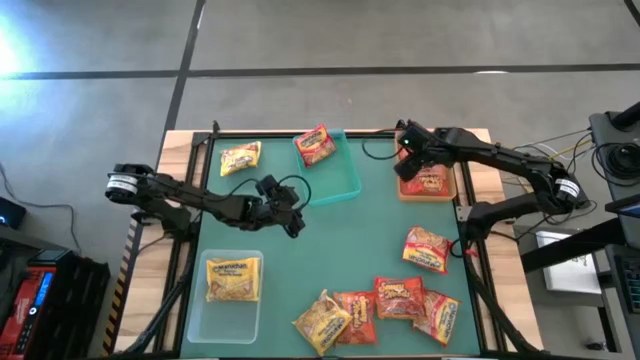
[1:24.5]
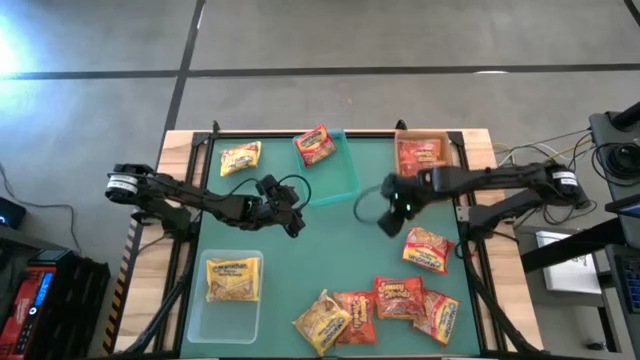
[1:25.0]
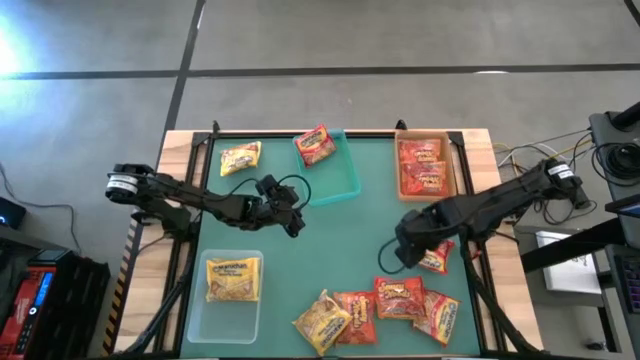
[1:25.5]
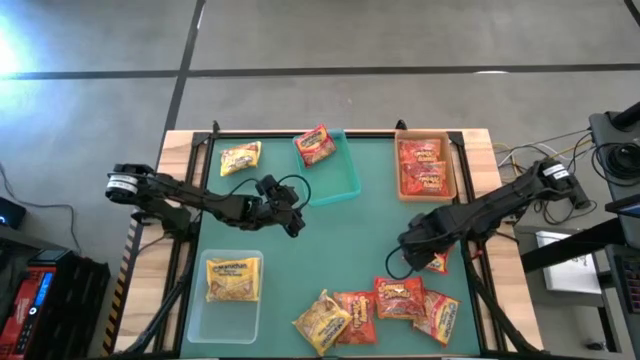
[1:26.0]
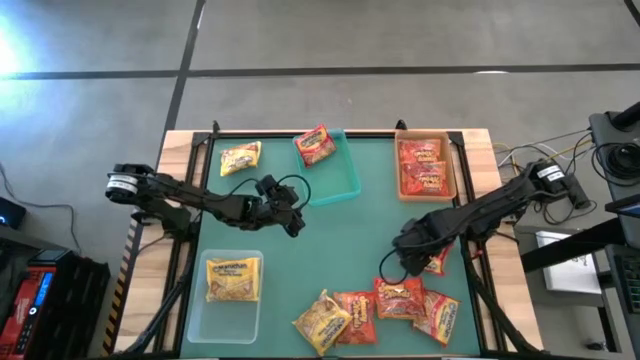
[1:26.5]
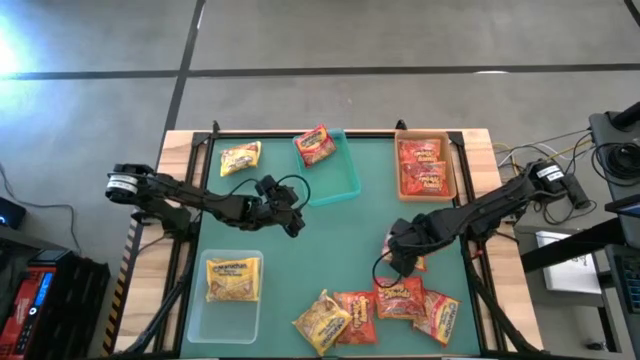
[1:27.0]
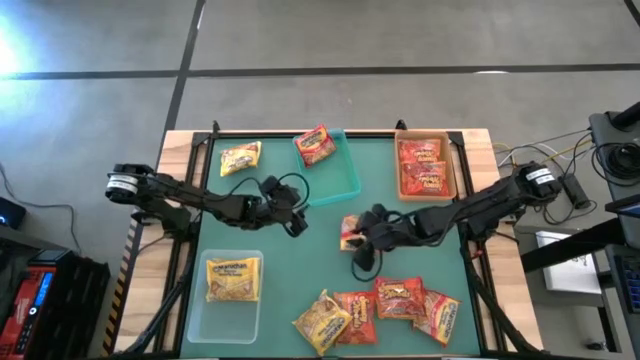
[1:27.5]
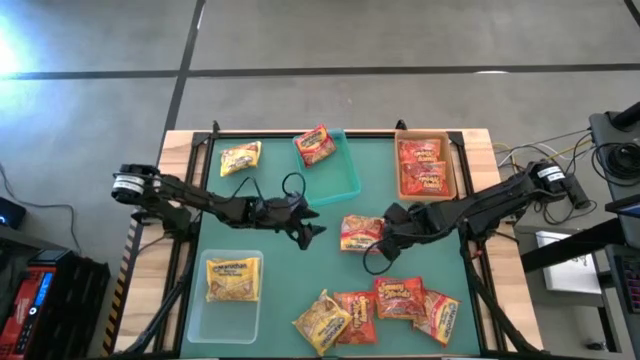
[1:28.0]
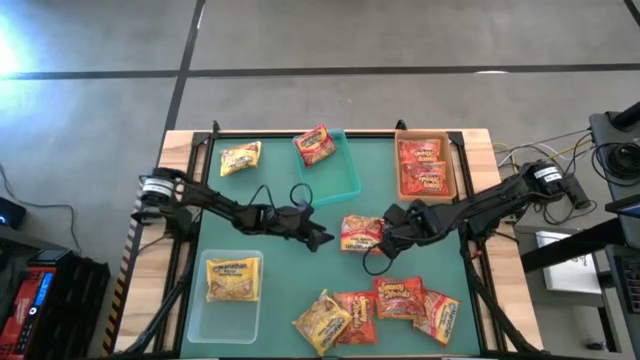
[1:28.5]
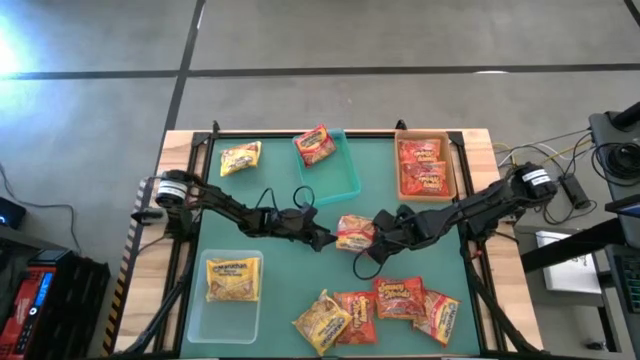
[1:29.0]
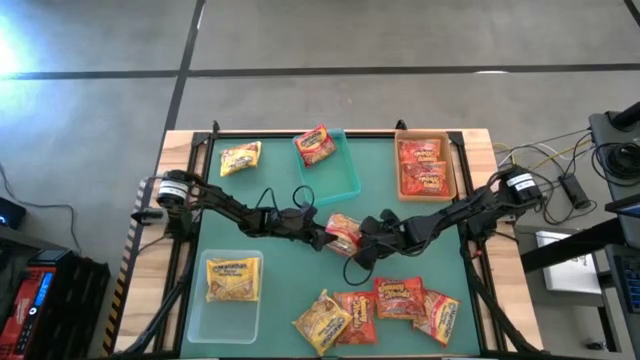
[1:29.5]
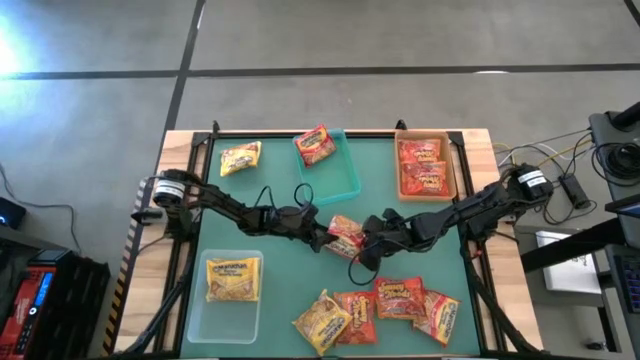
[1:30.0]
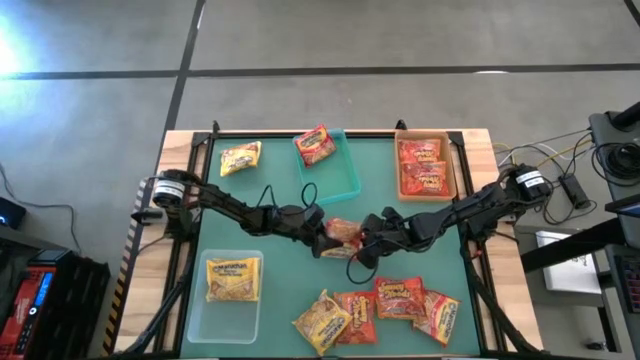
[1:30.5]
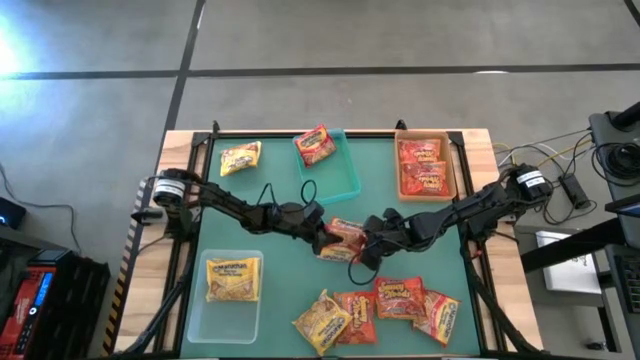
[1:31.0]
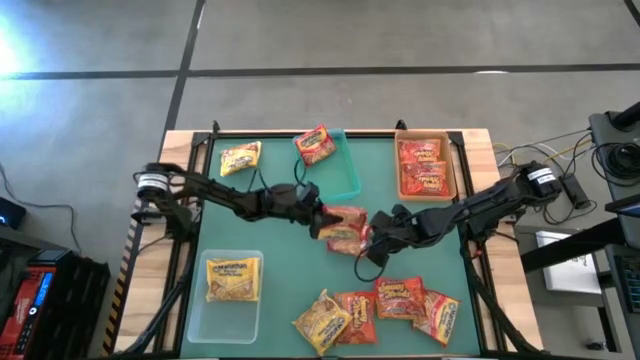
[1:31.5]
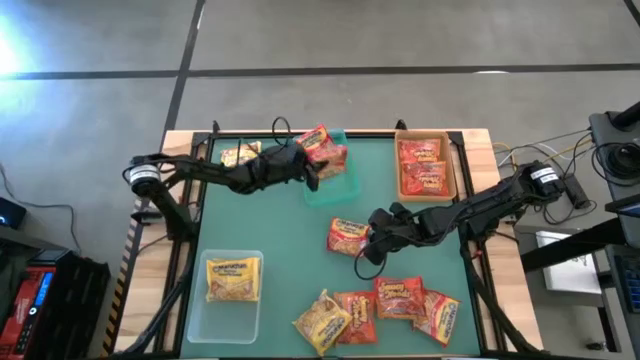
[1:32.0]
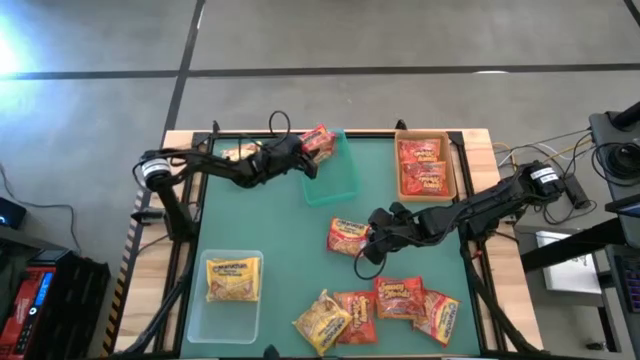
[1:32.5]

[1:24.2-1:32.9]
Task: Sort Maruchan noodles
Put the middle right red noodle pack into the green bin

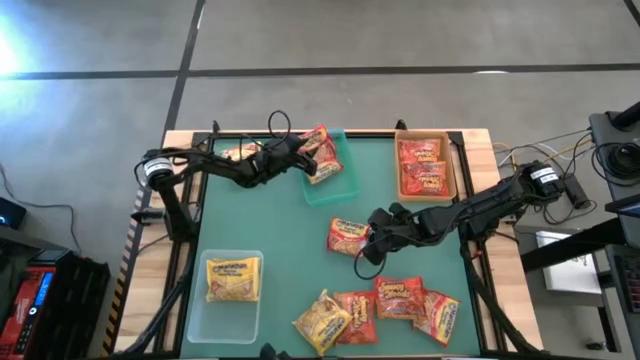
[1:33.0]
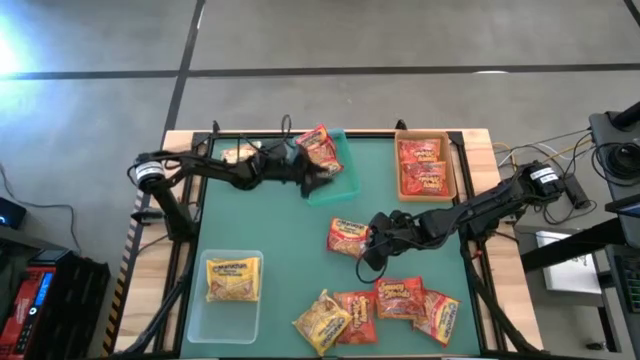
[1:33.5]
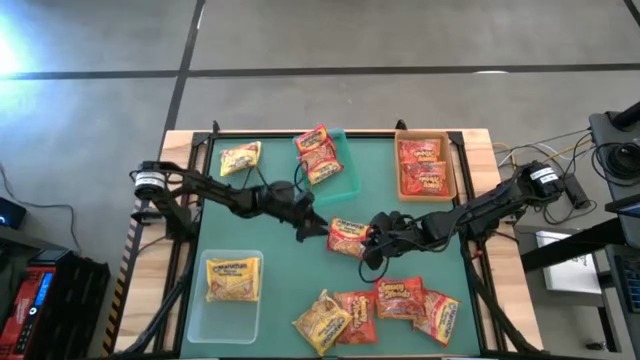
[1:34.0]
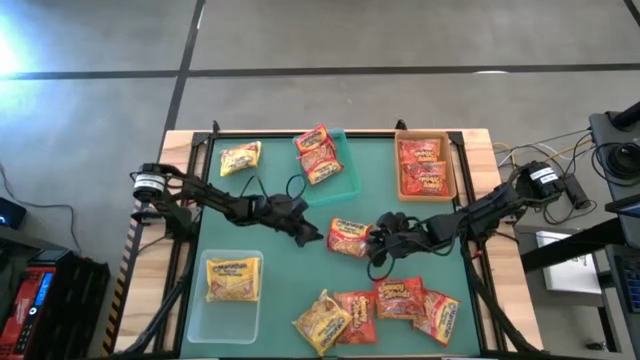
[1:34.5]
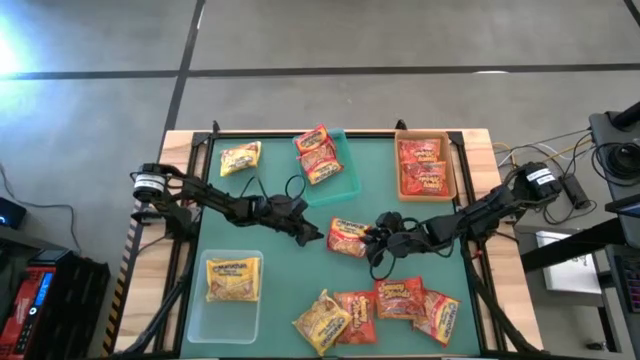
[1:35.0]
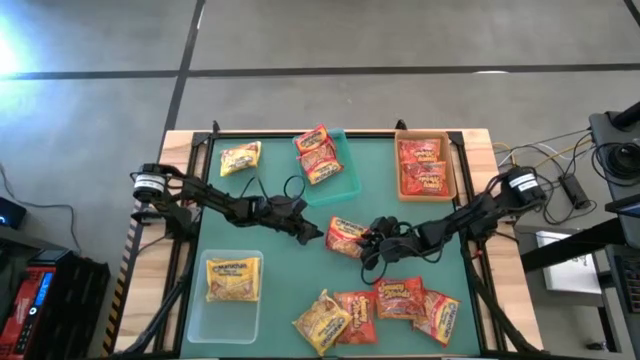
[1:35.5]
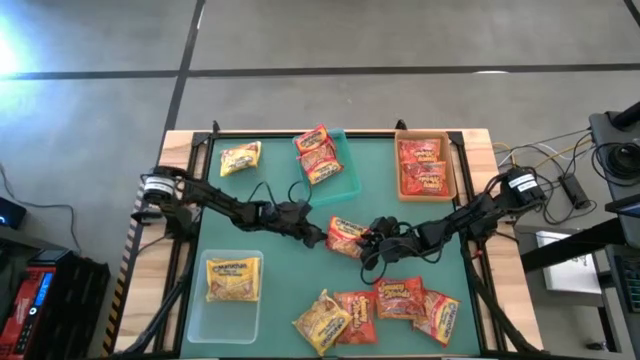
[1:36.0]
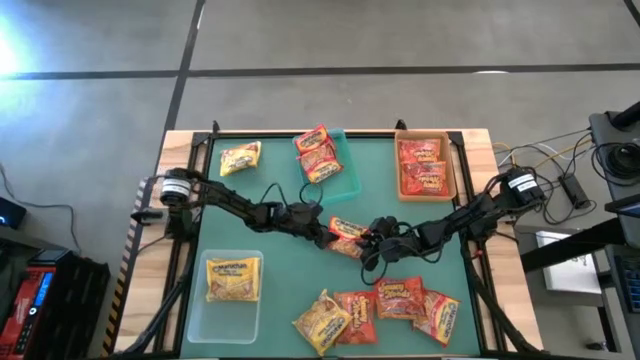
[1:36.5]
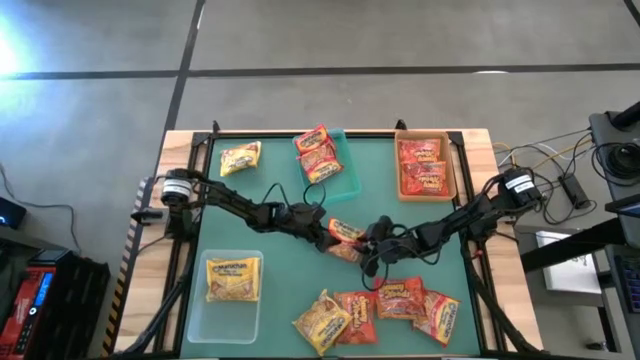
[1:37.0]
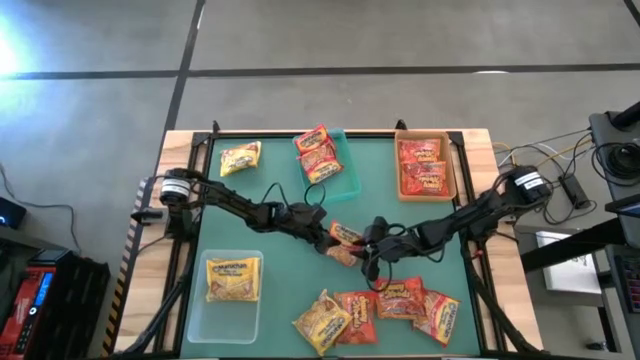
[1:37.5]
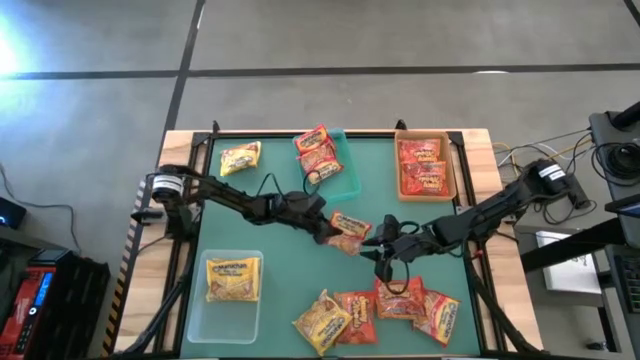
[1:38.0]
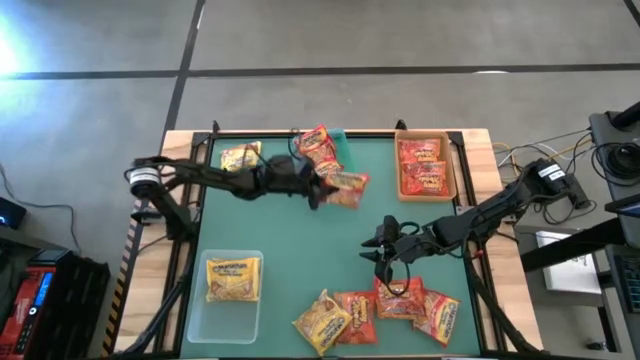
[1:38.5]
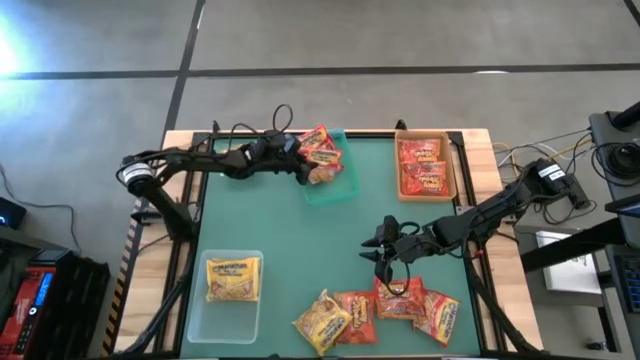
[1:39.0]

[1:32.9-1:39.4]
Put the top red noodle pack into the green bin

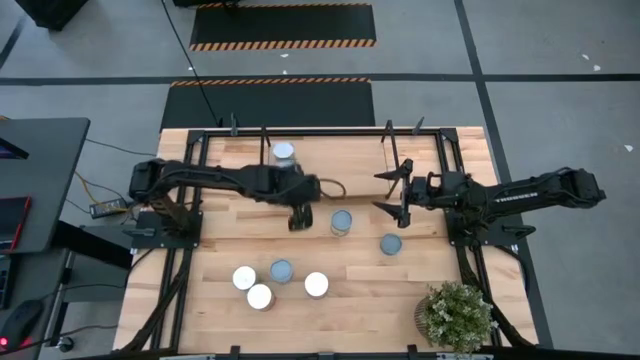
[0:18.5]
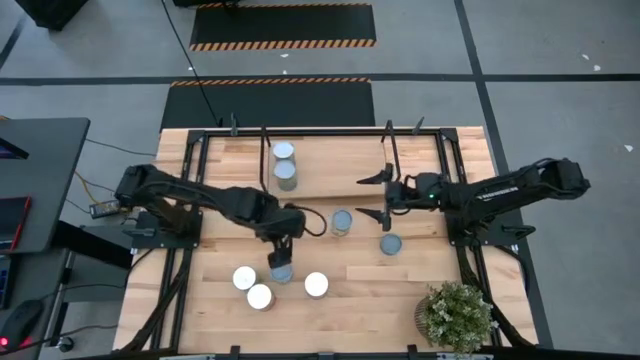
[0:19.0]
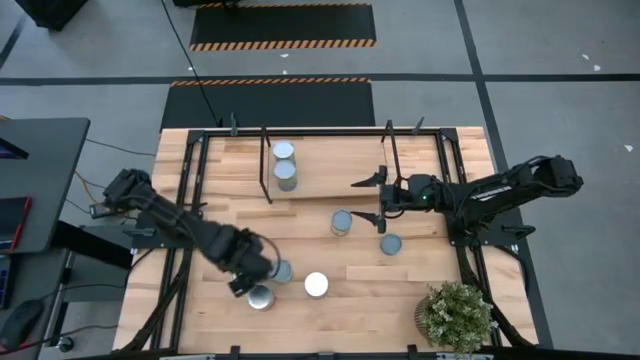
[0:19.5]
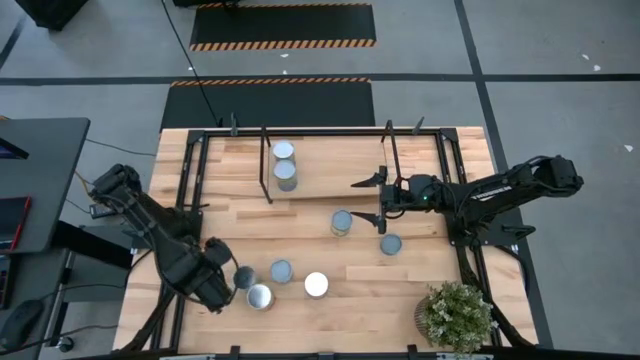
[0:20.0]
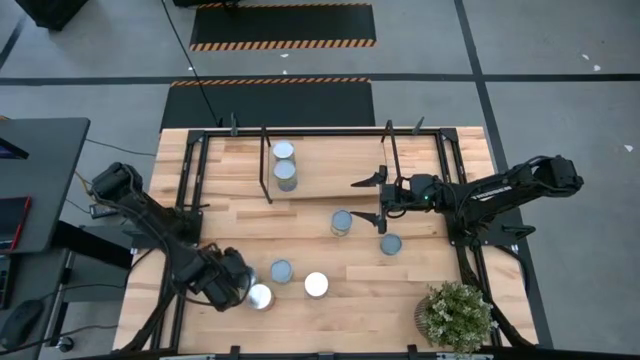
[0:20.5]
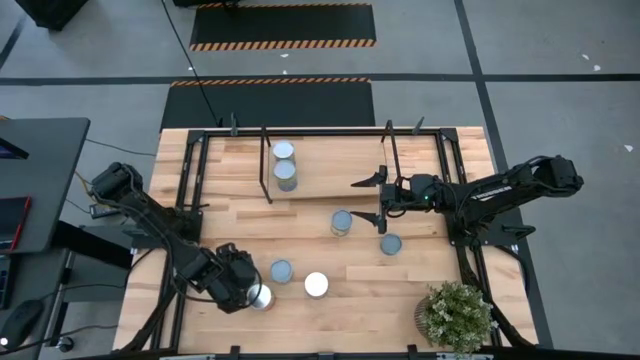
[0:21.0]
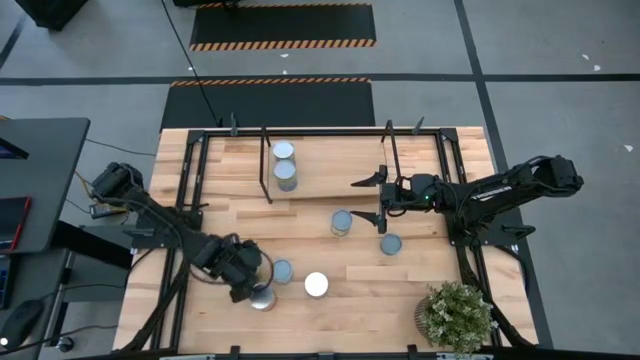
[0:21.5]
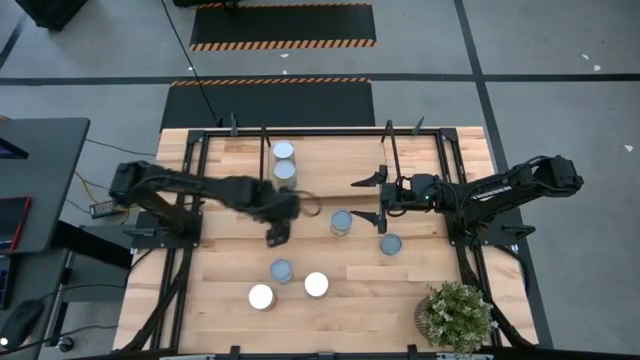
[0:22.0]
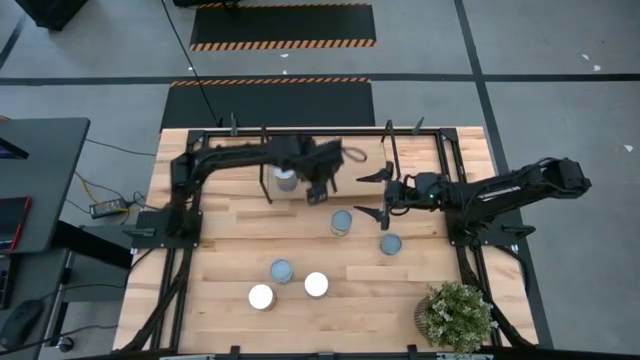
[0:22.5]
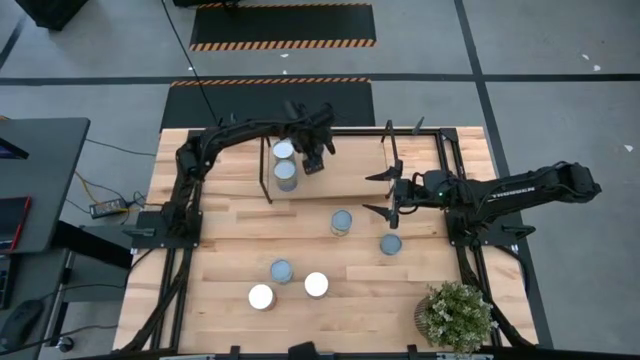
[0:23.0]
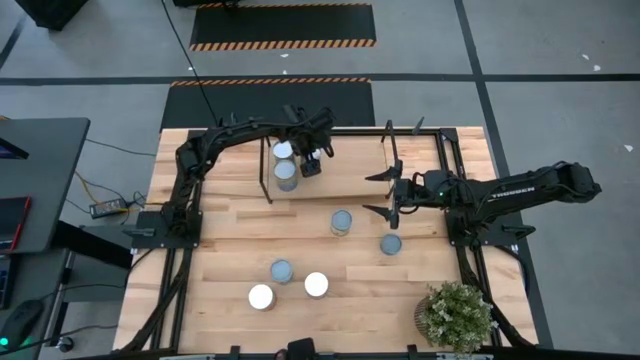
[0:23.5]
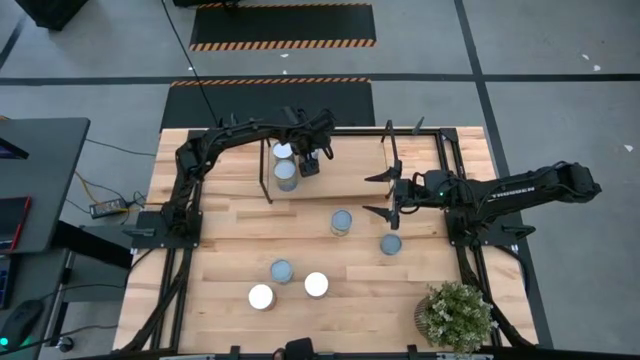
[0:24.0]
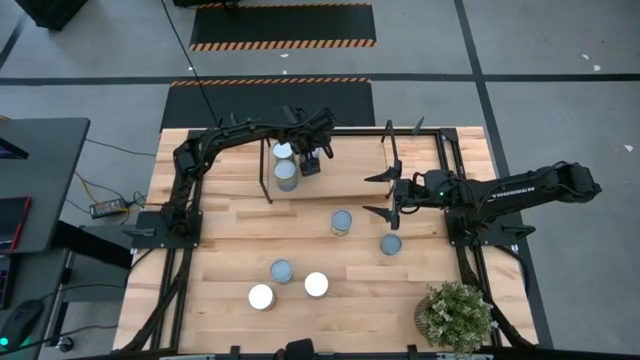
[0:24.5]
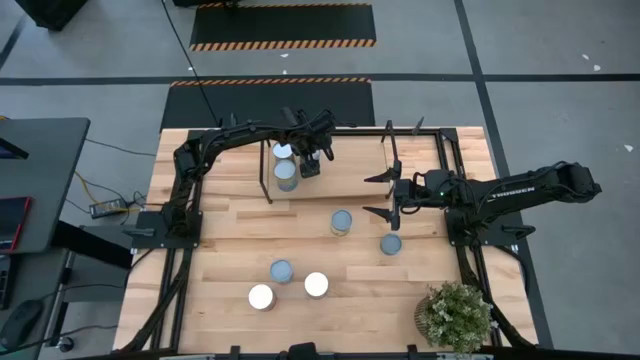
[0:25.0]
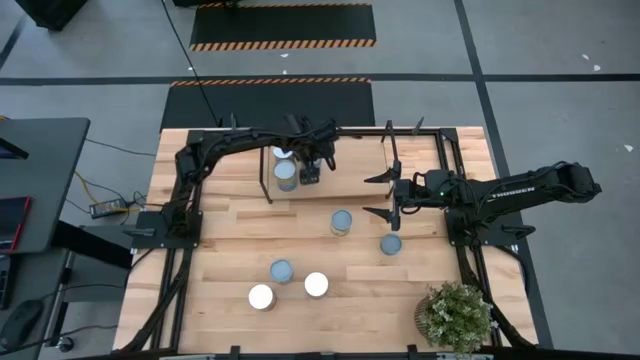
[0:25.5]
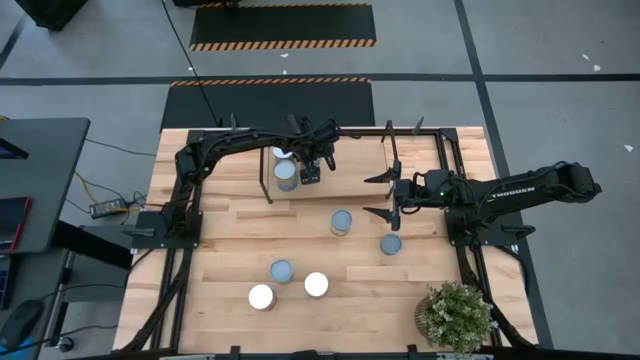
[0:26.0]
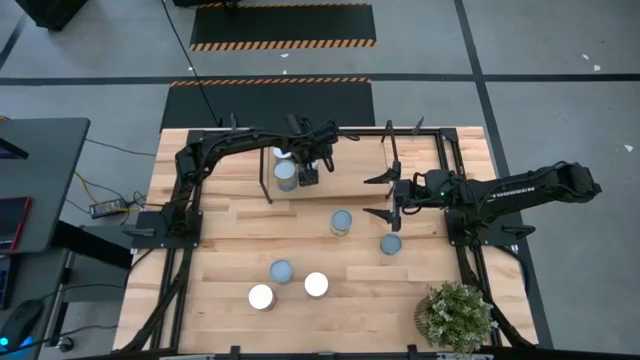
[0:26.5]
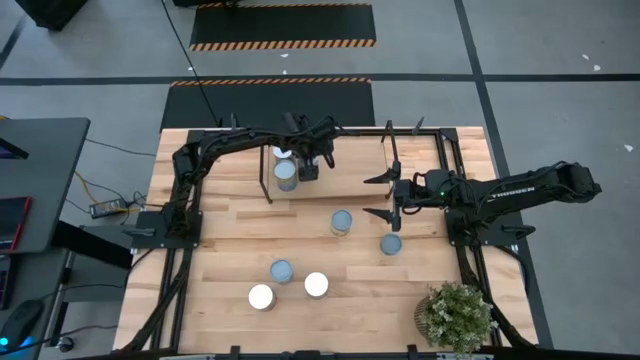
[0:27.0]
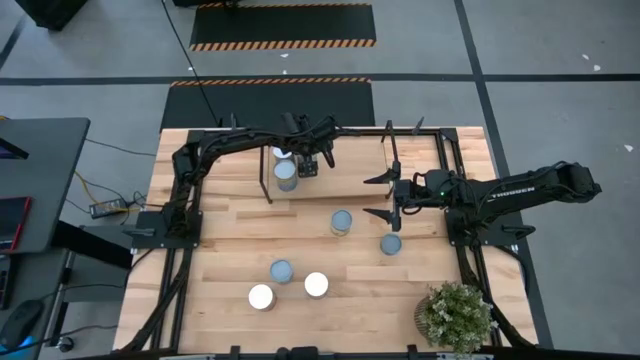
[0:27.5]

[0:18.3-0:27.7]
Task: Pick and place cans onto a shelf
Put the canned oranges on the shelf
